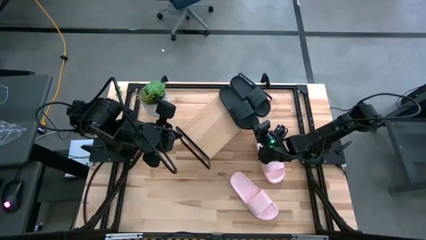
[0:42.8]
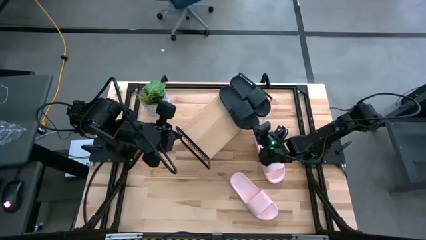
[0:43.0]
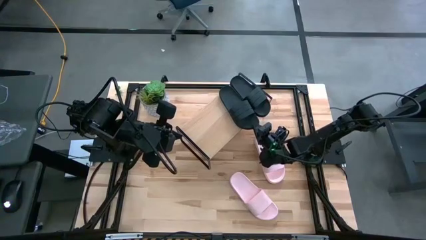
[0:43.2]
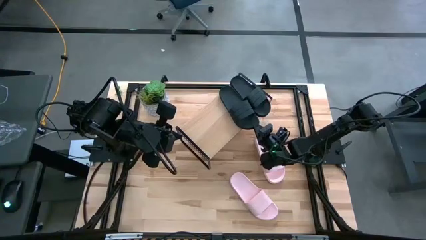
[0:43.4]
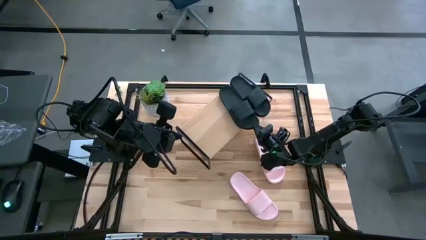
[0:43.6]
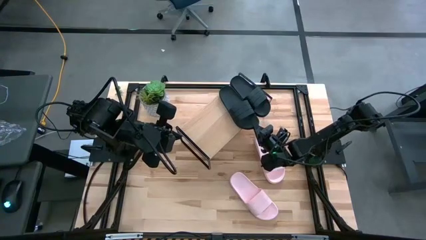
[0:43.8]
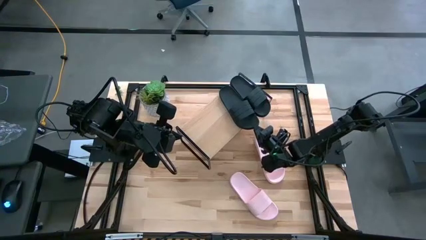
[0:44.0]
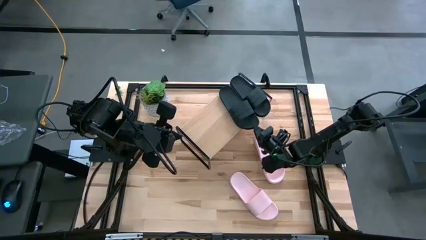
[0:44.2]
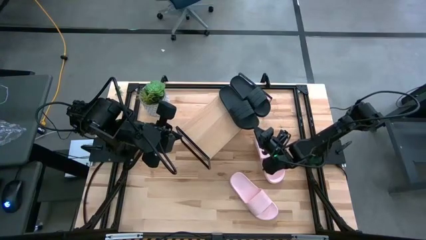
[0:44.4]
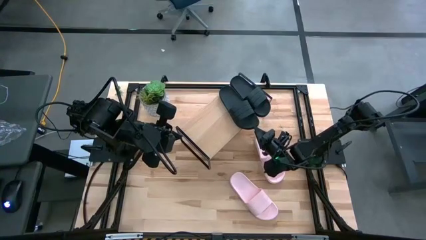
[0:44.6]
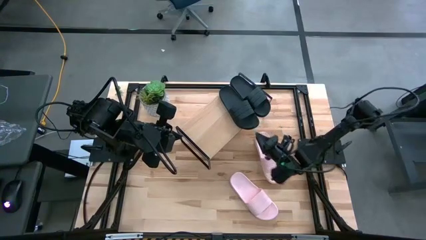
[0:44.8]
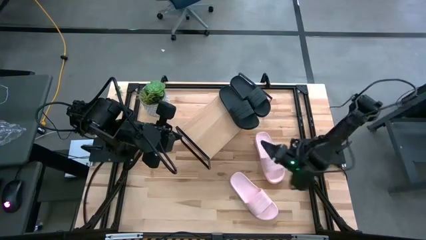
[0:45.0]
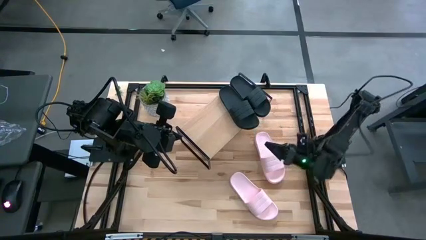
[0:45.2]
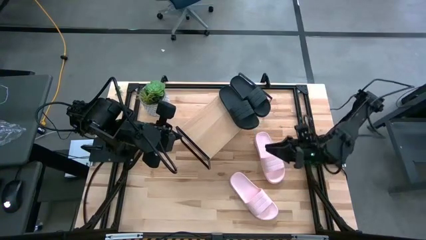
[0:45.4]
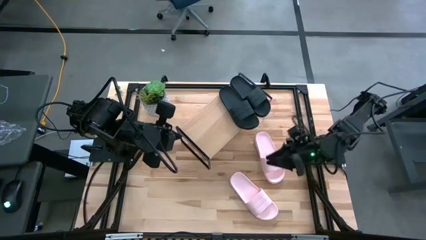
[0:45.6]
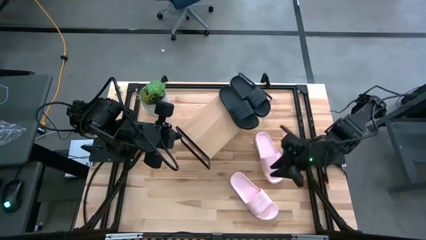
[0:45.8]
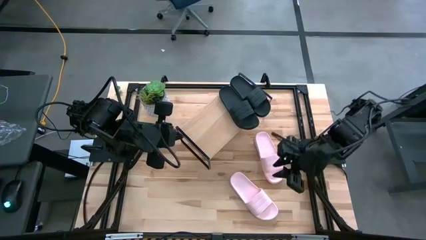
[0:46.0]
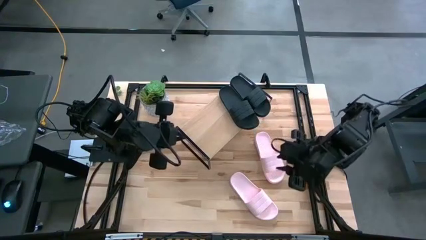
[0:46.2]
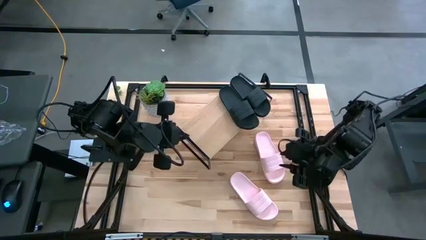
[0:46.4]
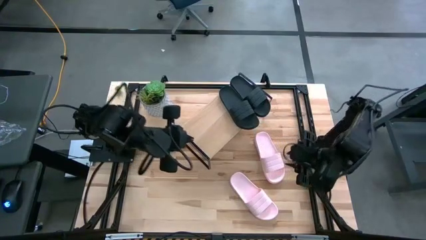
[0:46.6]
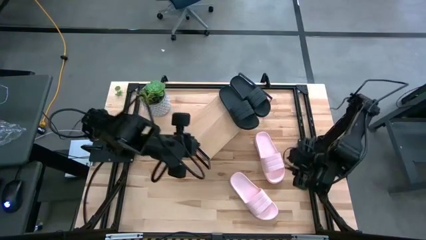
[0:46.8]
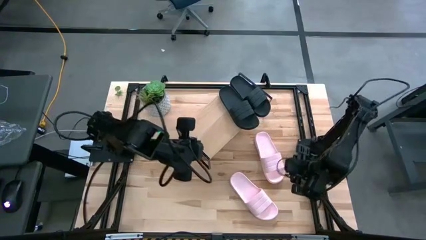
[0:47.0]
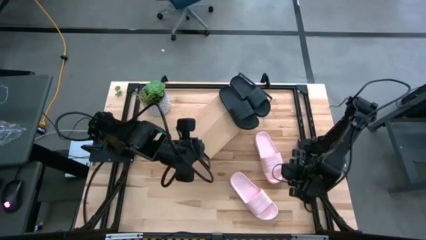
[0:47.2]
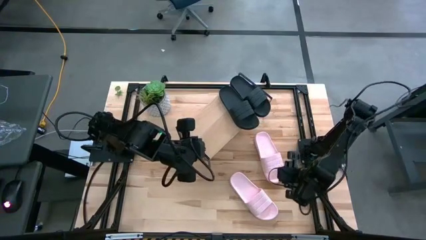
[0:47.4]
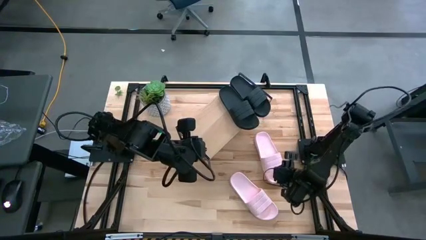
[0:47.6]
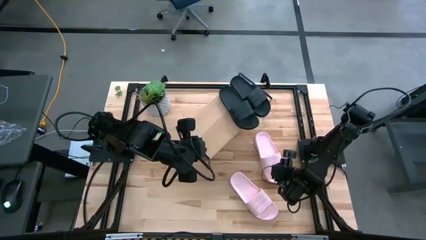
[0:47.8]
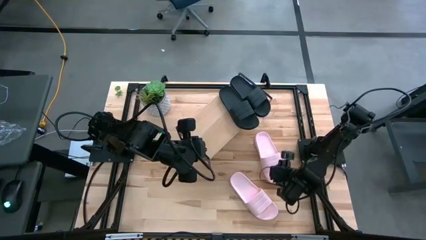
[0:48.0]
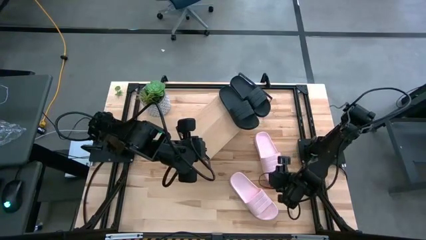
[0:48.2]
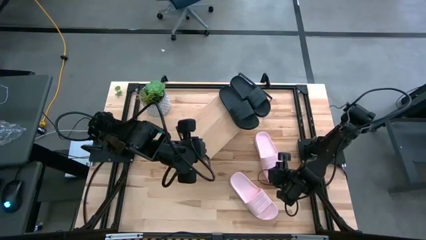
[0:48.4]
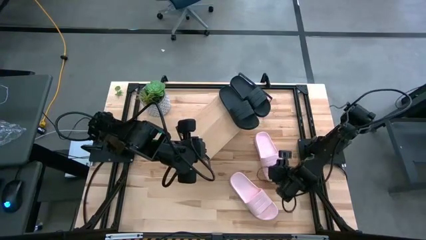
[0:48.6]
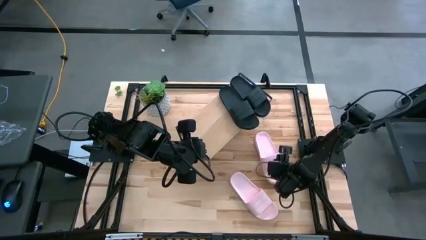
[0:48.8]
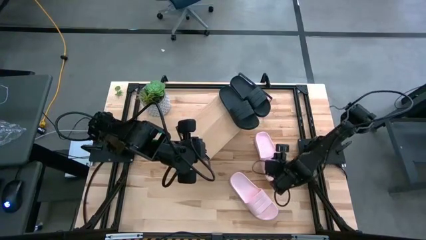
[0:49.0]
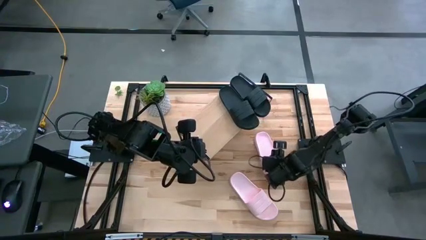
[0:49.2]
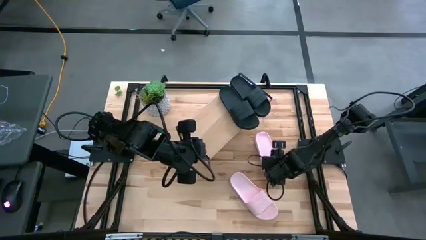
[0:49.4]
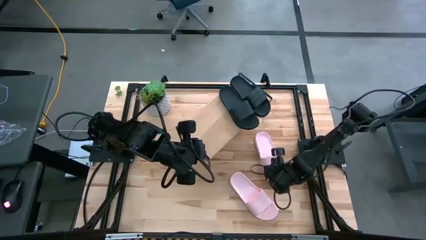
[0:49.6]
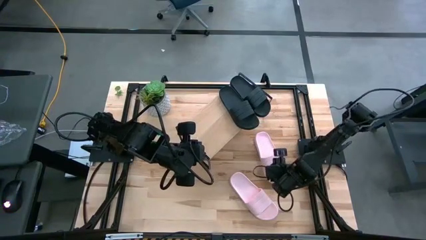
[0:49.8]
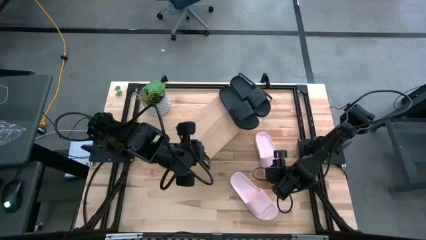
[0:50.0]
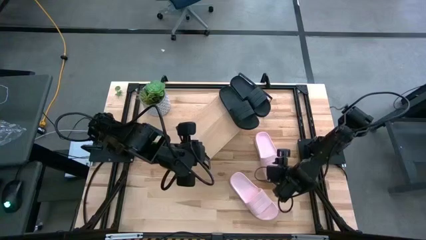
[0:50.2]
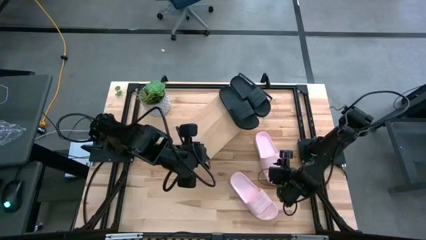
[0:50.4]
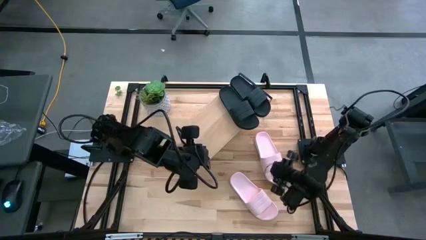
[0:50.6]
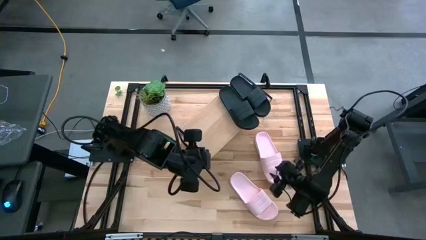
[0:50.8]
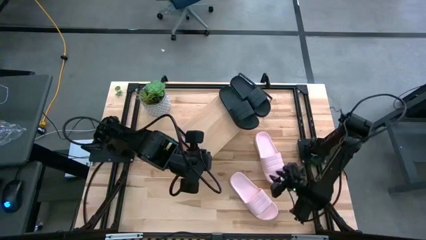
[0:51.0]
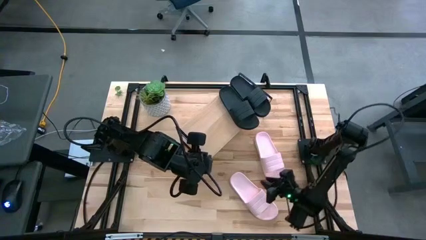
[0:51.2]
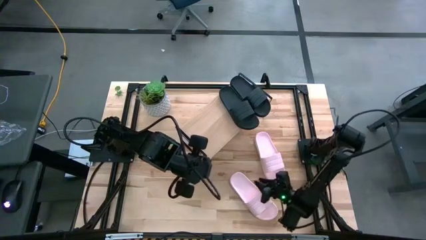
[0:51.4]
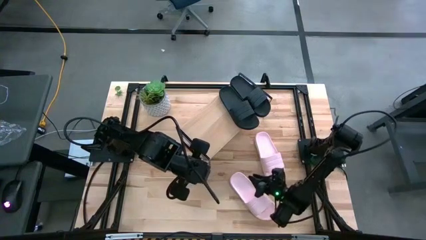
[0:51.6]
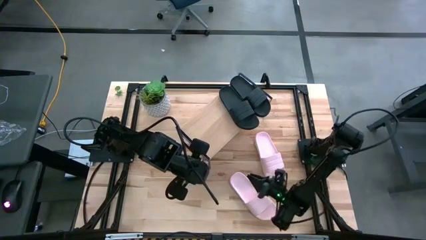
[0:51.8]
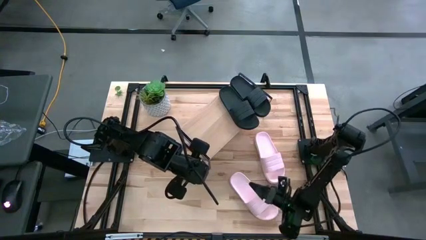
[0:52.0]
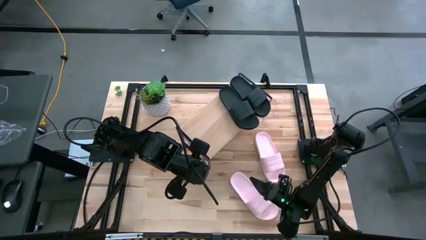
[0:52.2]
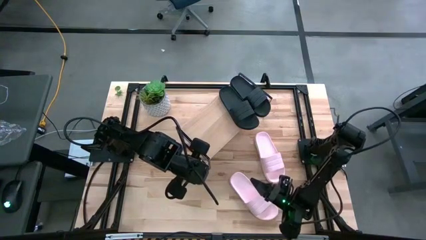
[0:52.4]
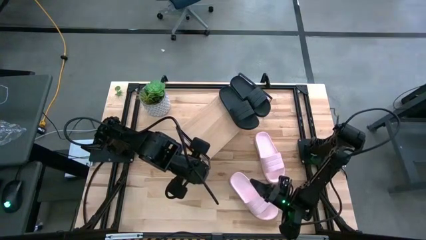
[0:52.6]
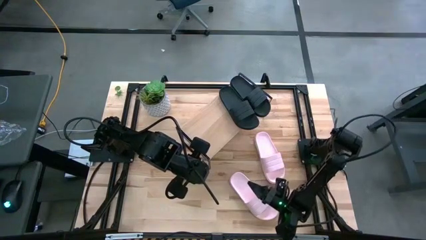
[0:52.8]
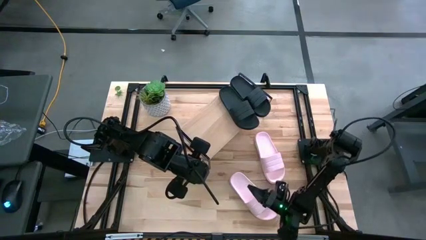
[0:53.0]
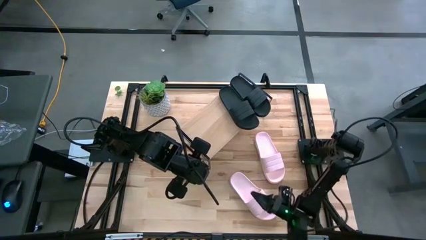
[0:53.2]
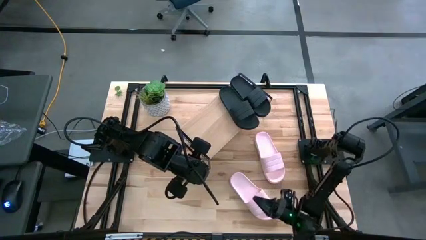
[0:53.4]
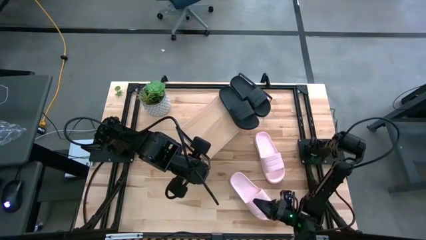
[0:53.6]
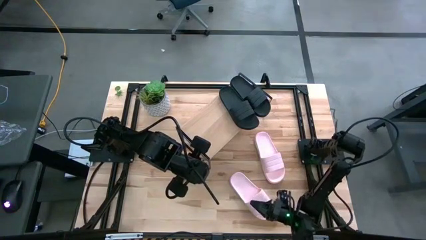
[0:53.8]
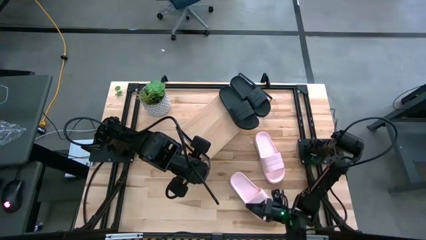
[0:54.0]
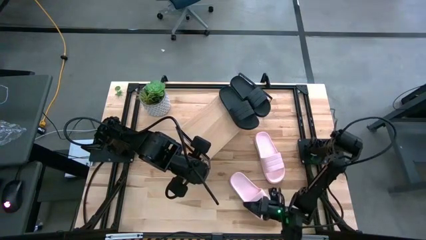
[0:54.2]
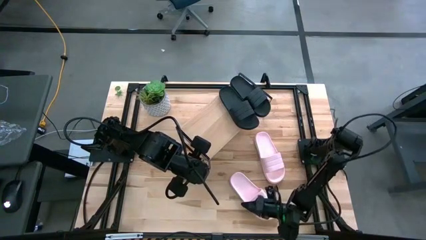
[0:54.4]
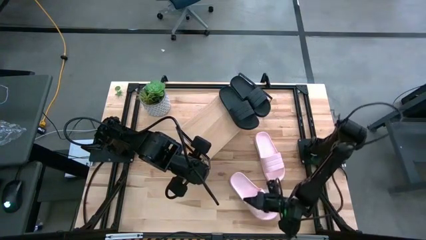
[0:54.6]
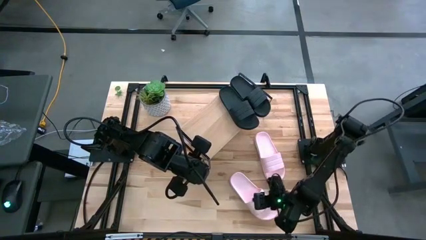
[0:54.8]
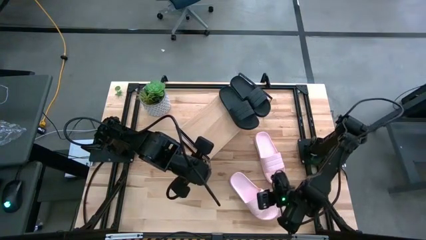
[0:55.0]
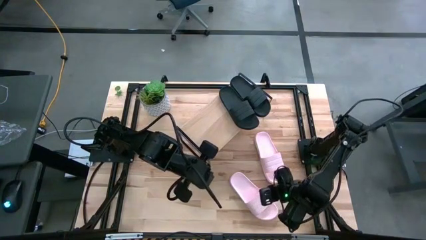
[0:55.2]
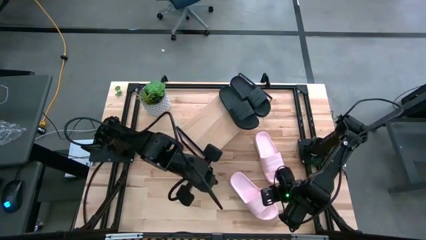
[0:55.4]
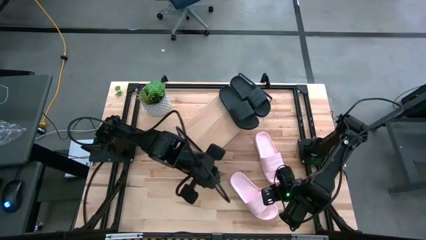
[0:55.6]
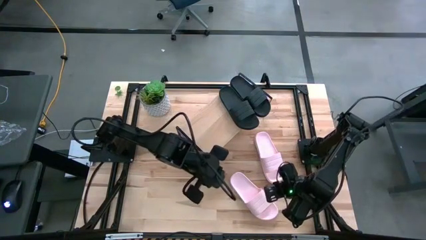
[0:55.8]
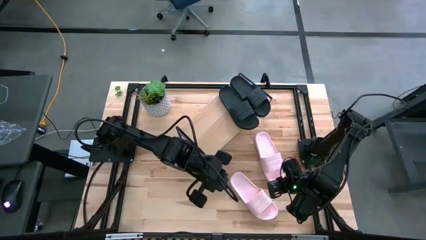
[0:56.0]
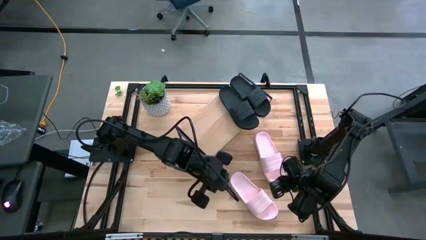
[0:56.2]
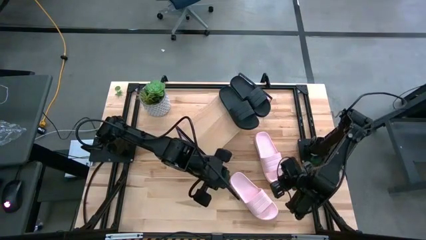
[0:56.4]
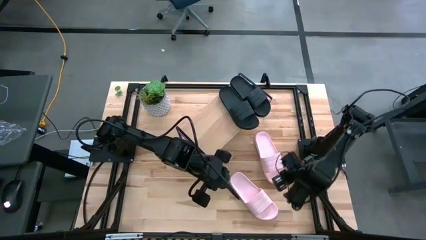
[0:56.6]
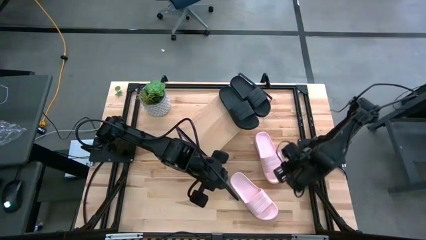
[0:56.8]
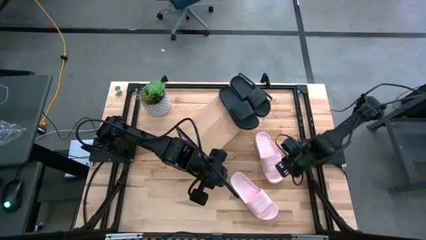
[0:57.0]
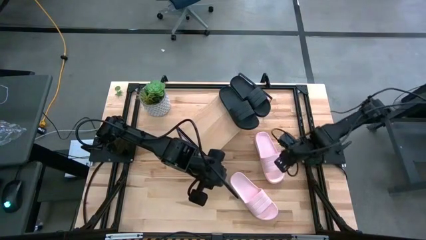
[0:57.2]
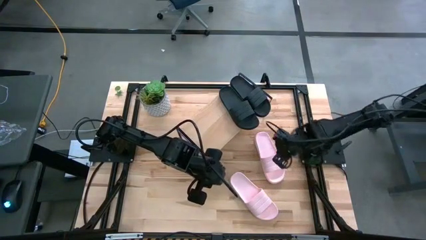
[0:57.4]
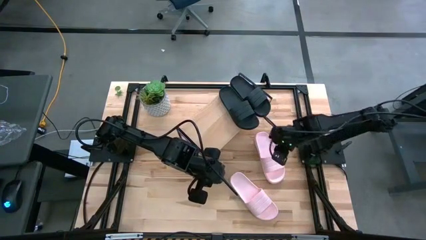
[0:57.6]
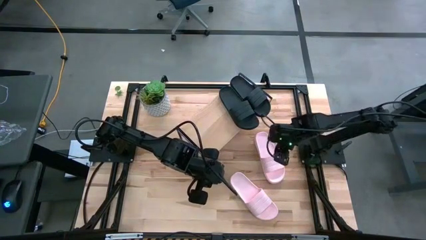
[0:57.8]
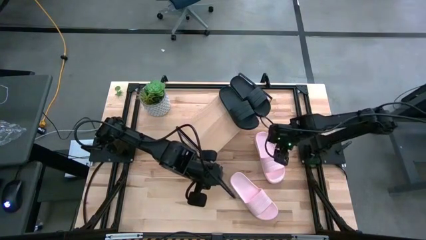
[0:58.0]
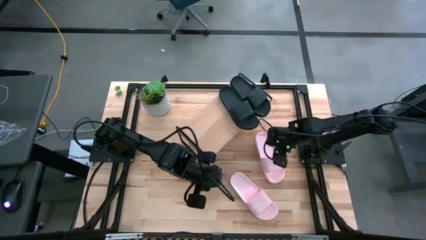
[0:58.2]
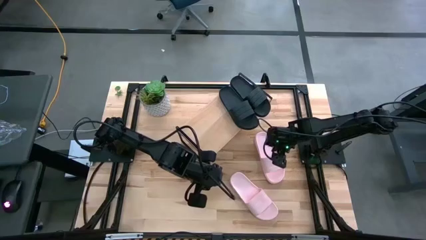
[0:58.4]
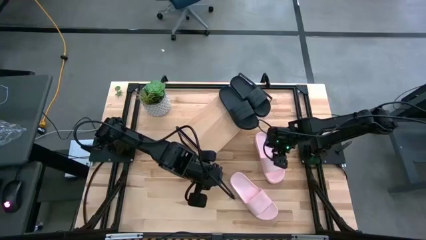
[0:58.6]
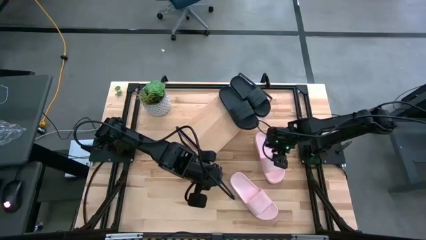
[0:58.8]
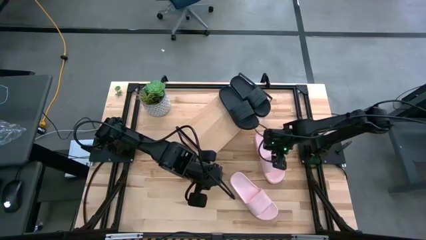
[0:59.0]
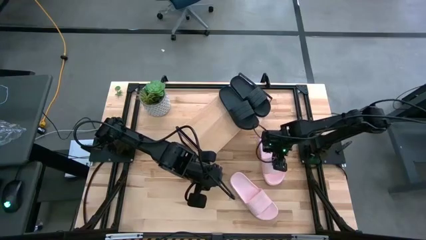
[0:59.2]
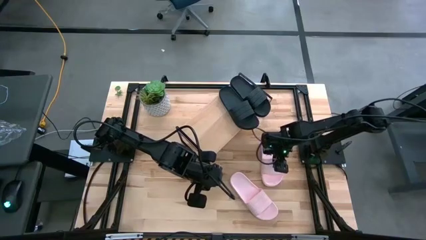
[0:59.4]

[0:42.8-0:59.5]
Task: Pick and place slides into the shelf
Put the top pink slide on the shelf
